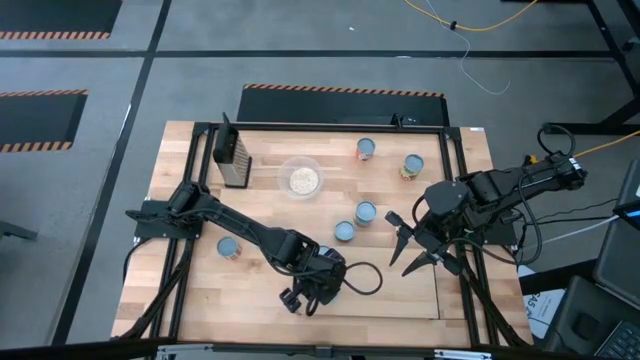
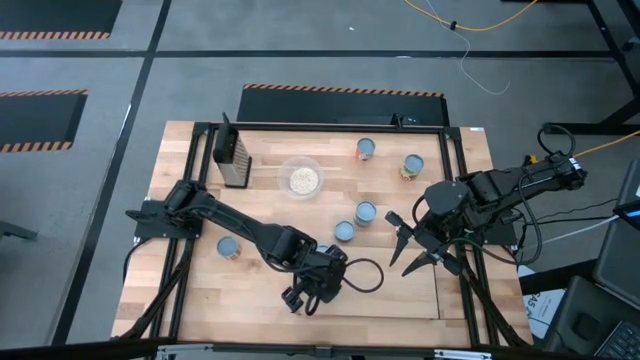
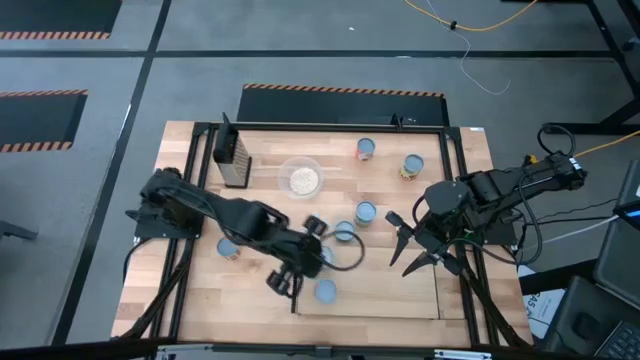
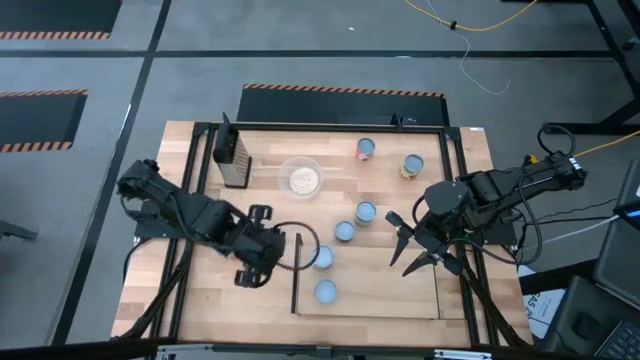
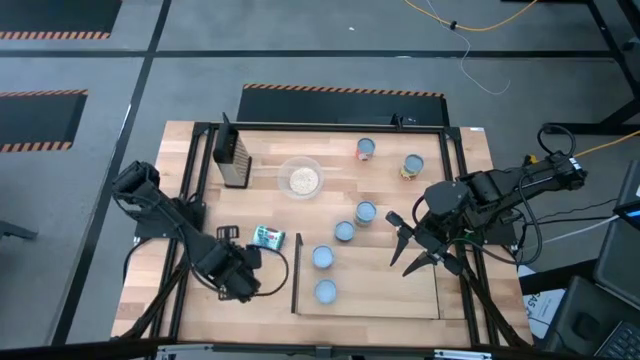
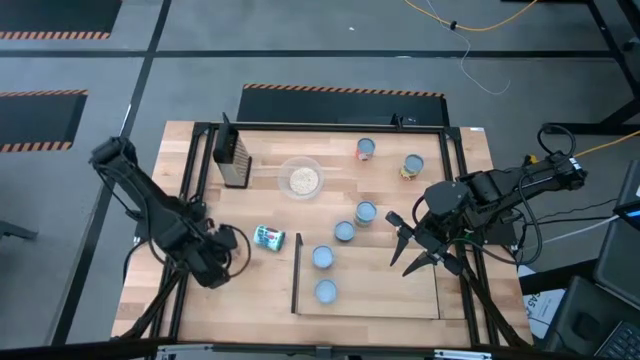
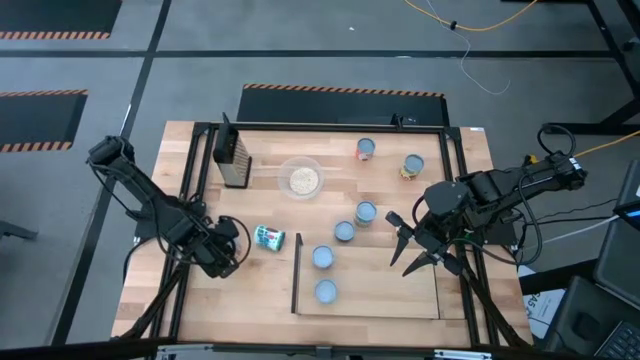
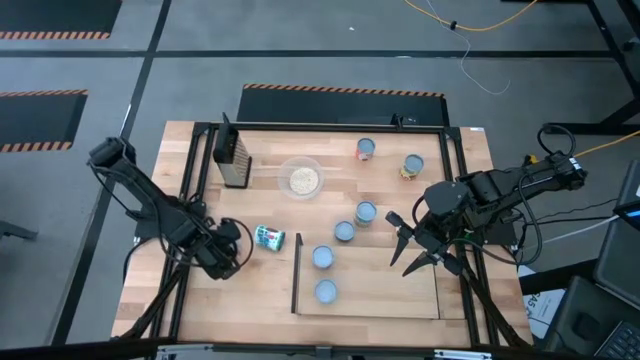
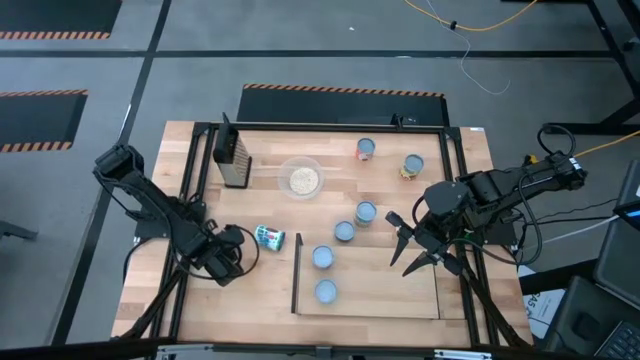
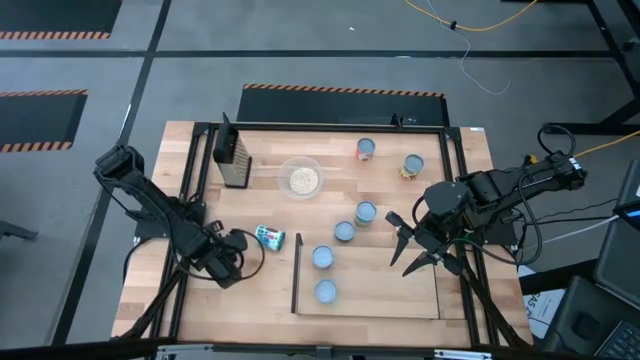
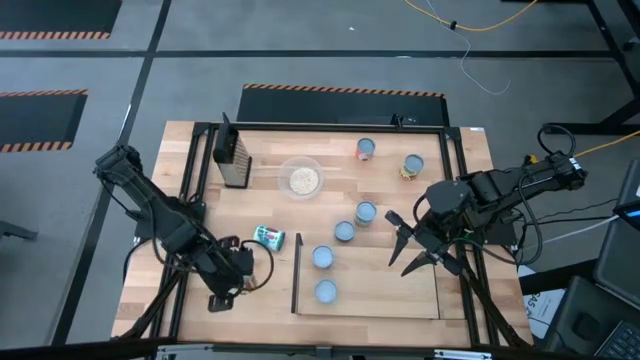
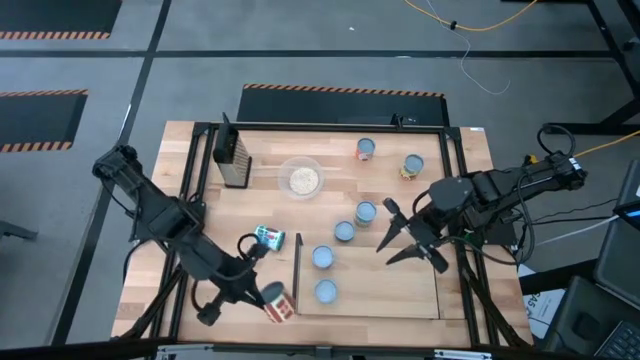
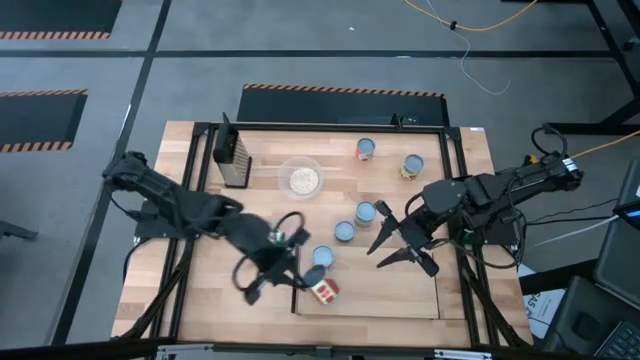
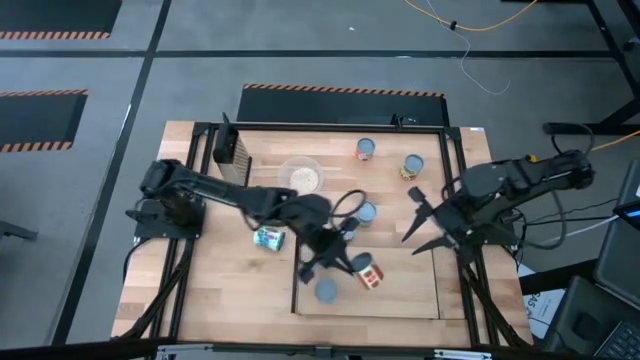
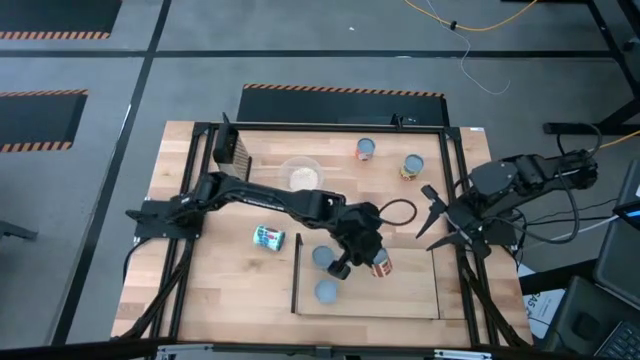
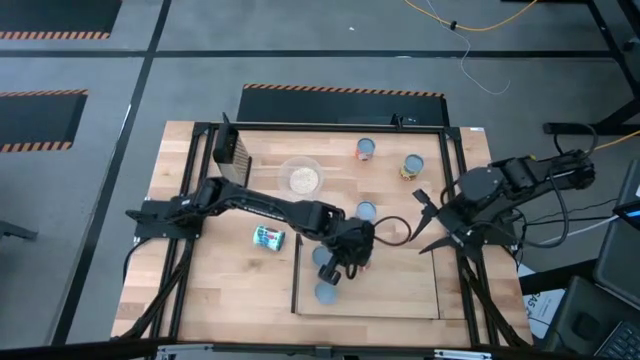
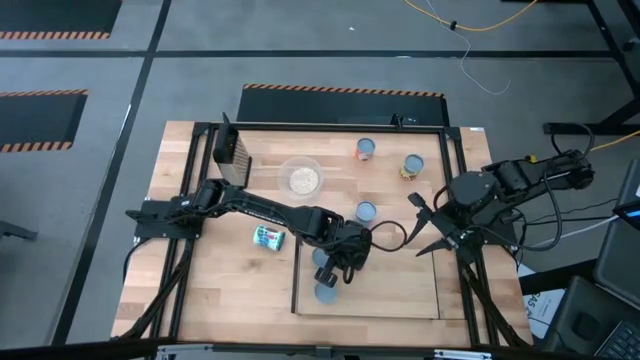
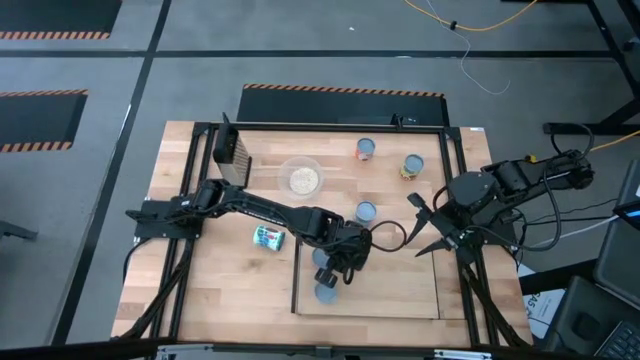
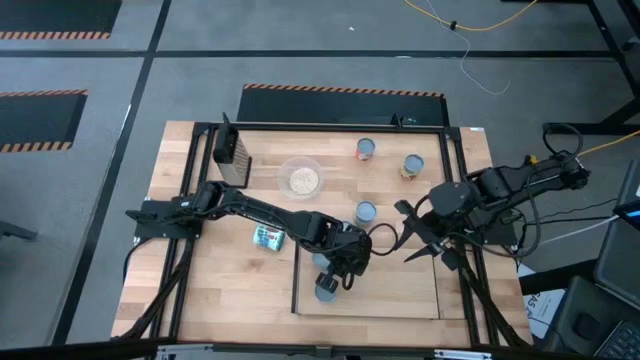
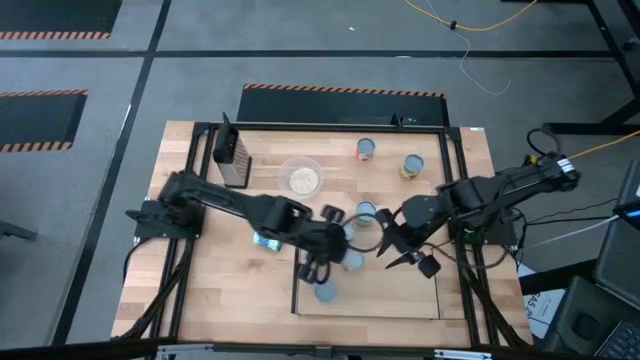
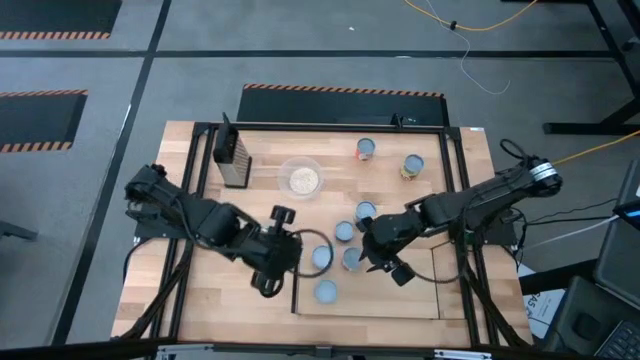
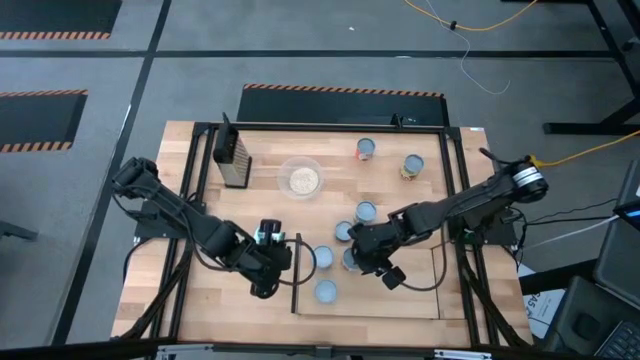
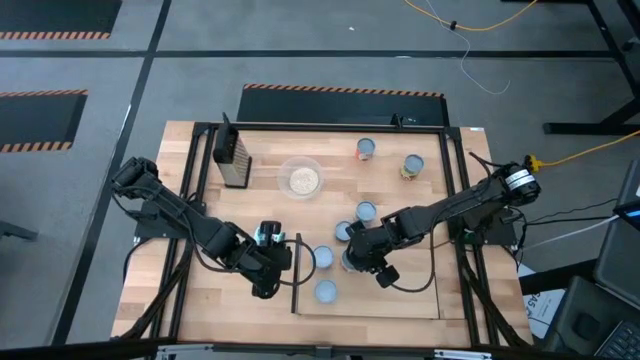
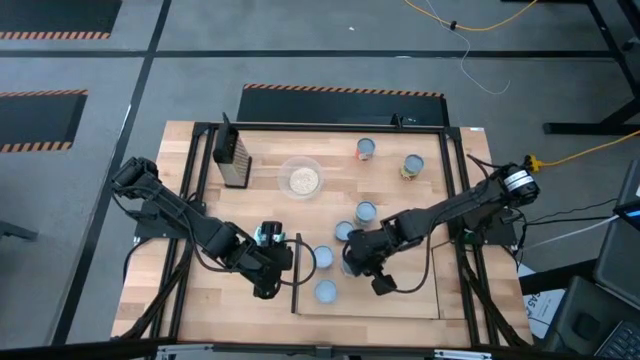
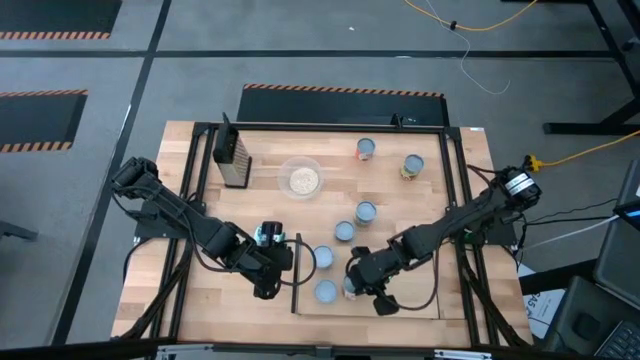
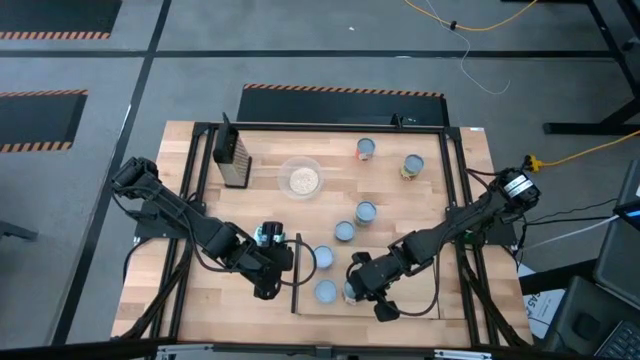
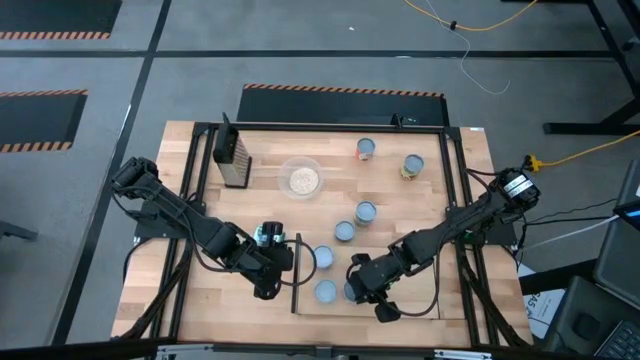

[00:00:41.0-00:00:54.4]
Task: Pick and place cans onto a shelf
Put the canned tomato on the shelf

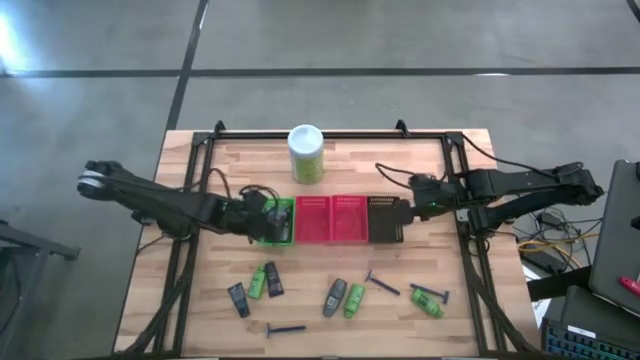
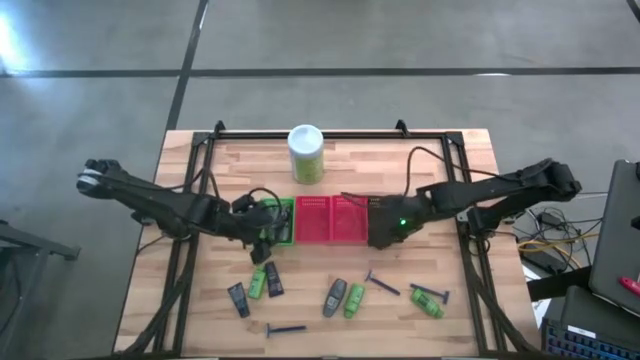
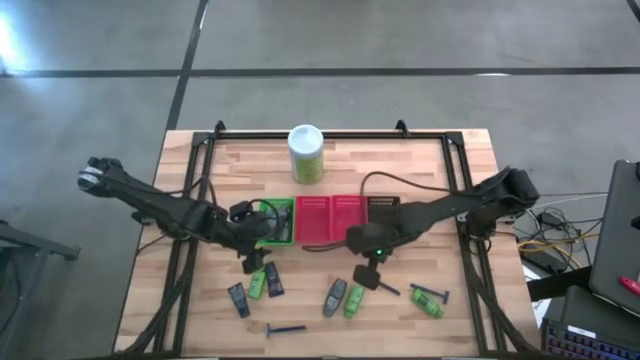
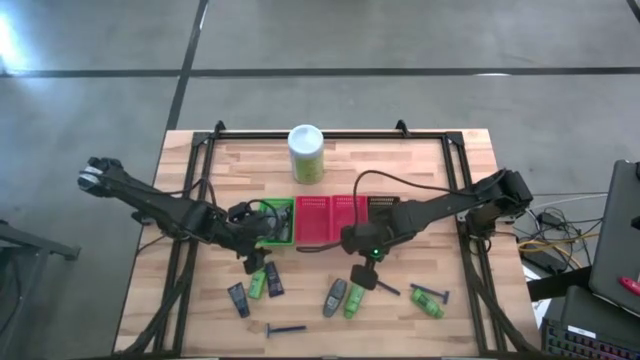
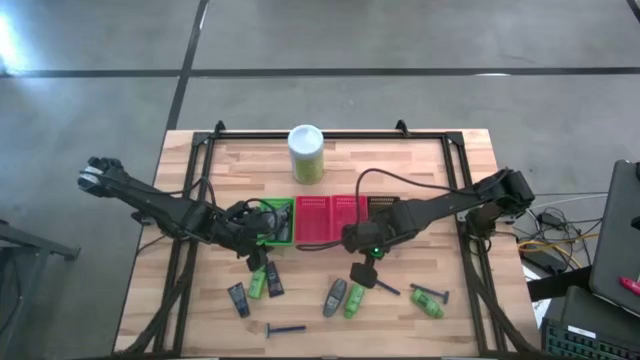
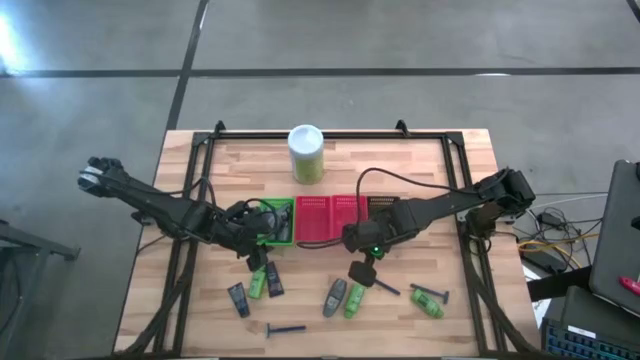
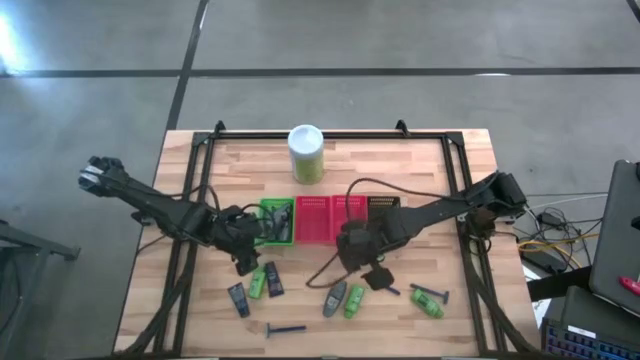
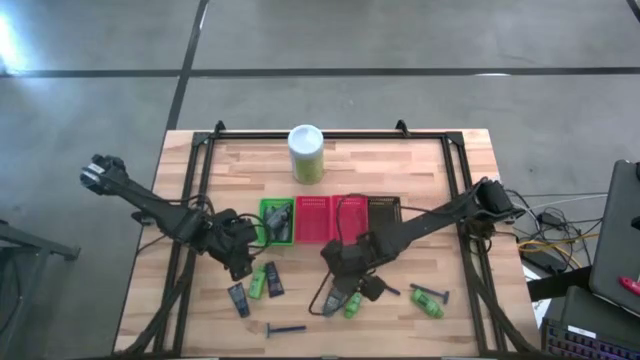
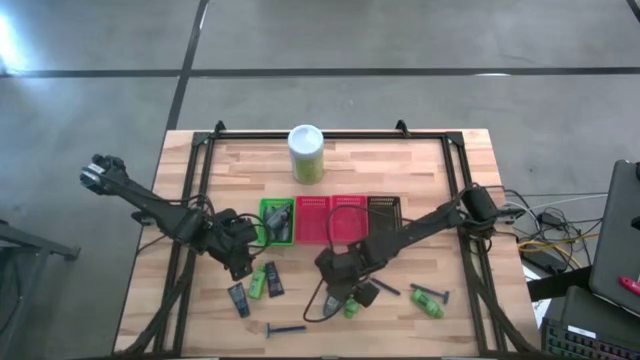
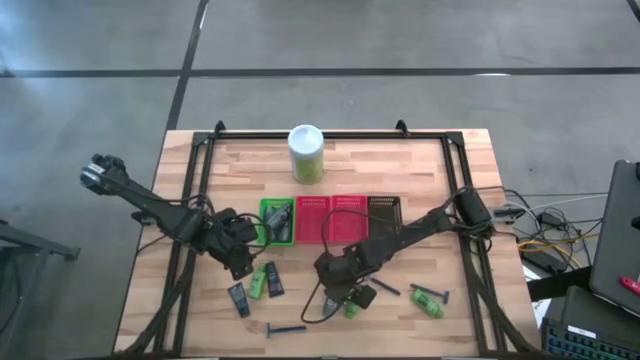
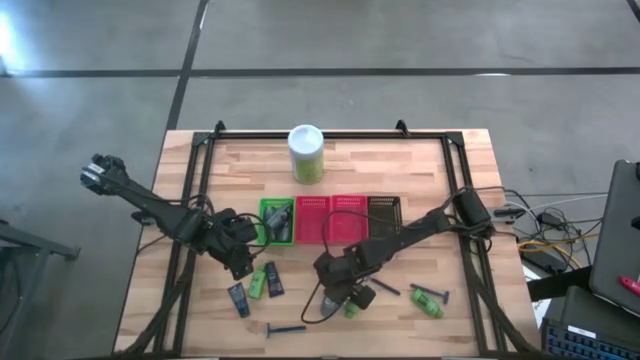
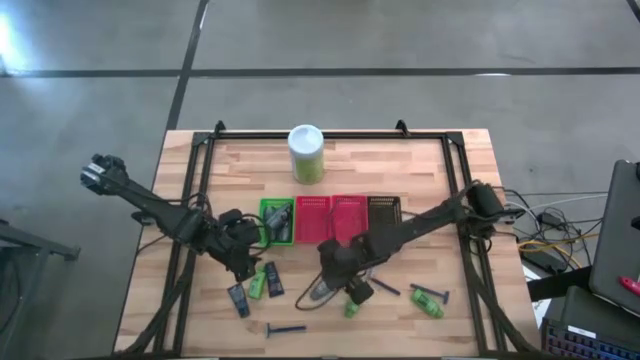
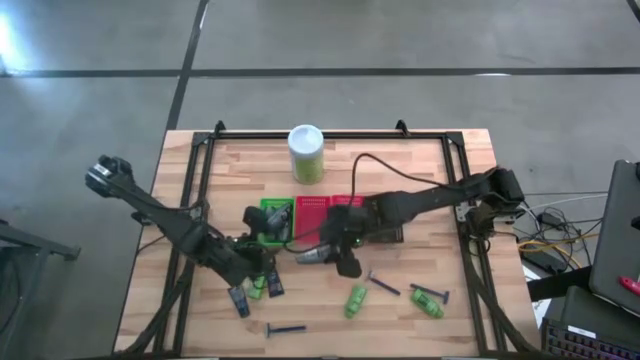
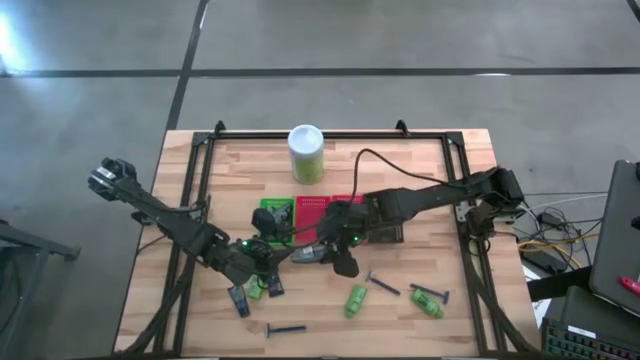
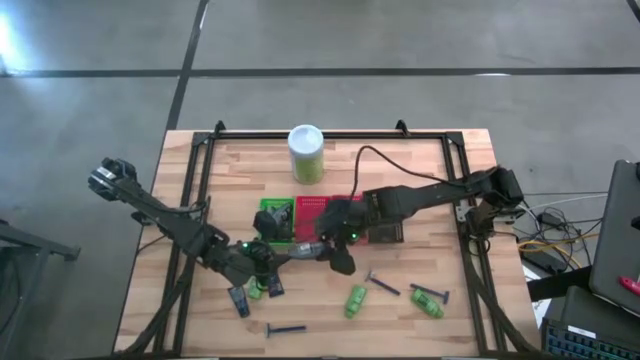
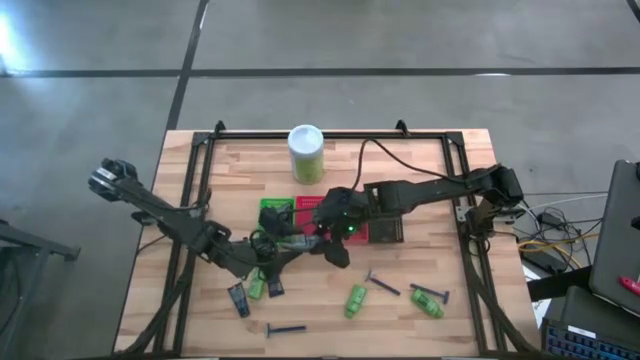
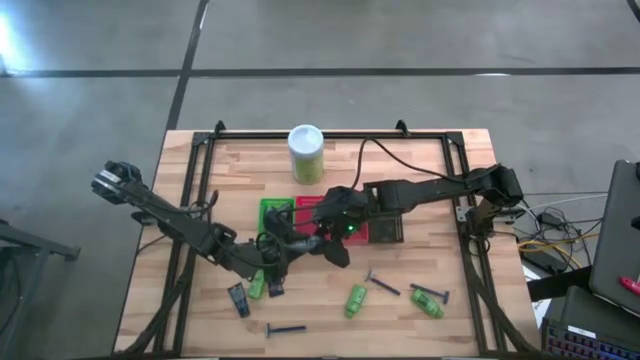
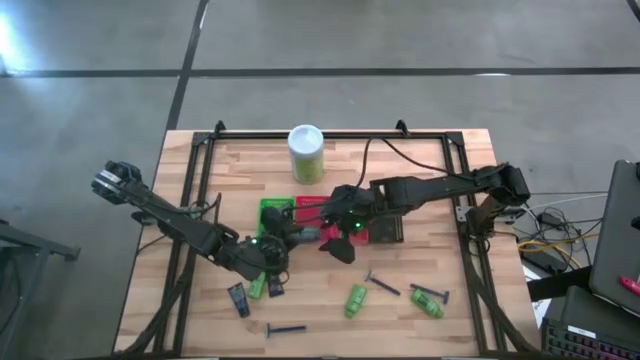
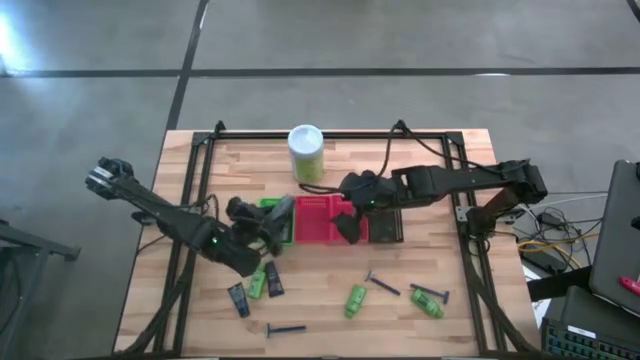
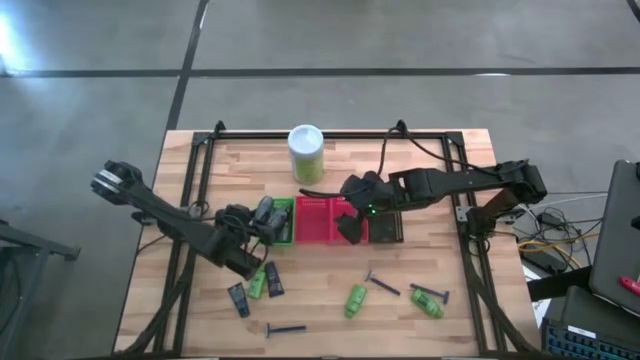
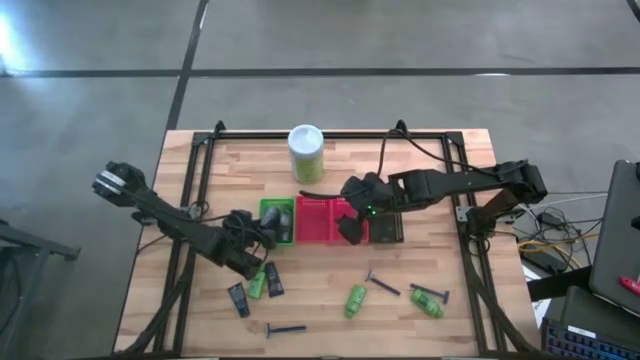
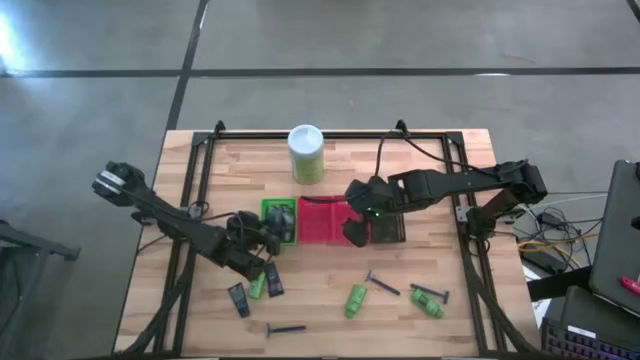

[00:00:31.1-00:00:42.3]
Task: Pick & Place Travel size toiletries
Put the gray deodorant into the green bin
